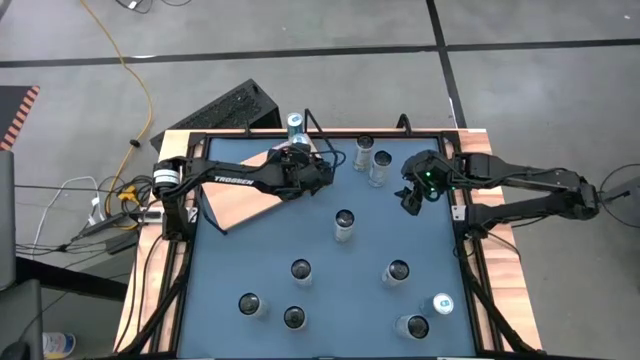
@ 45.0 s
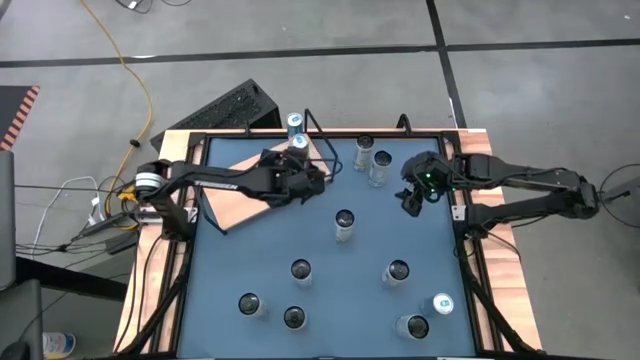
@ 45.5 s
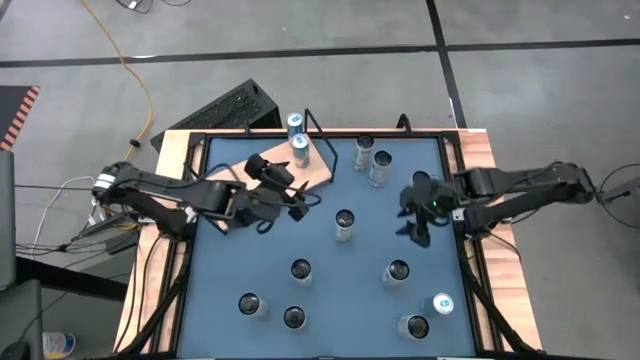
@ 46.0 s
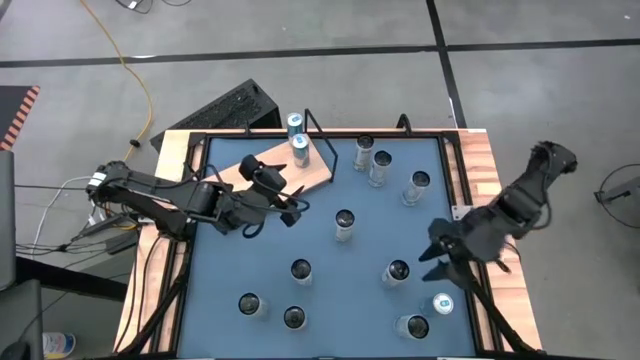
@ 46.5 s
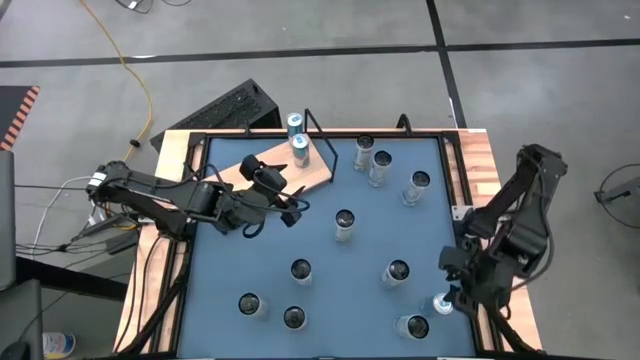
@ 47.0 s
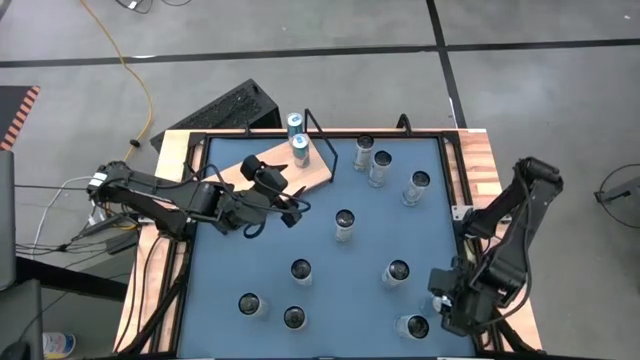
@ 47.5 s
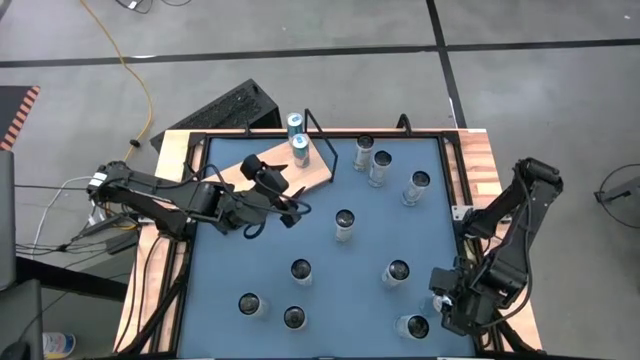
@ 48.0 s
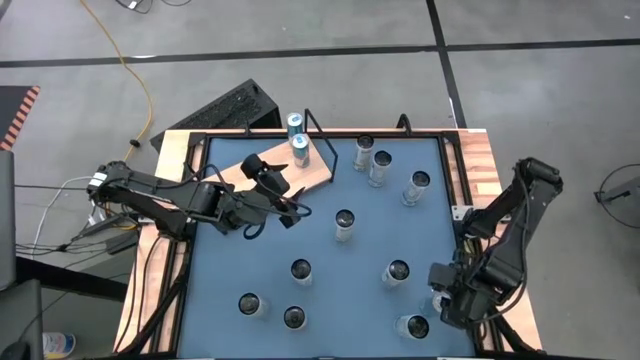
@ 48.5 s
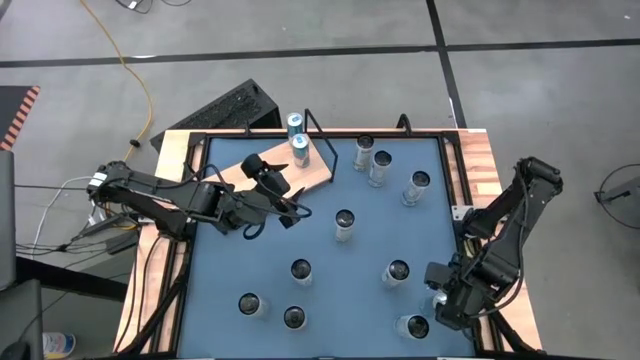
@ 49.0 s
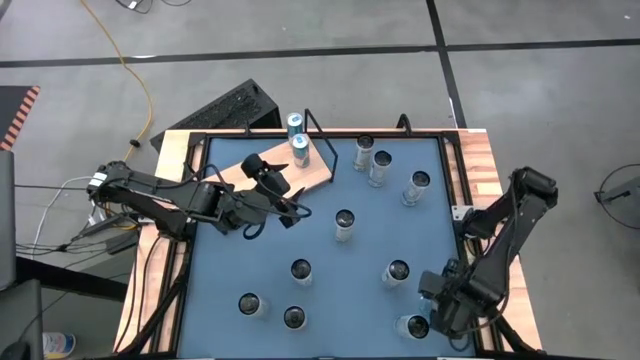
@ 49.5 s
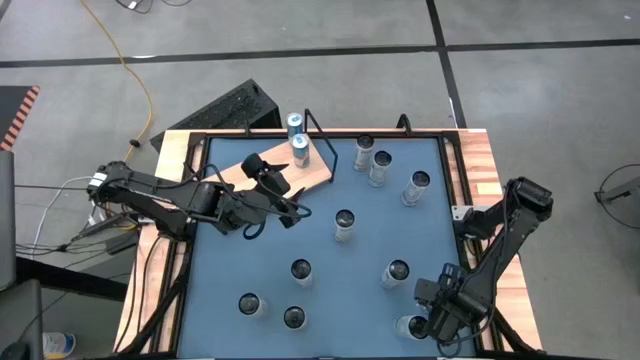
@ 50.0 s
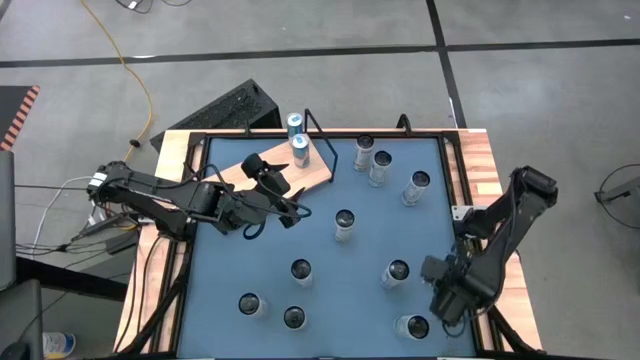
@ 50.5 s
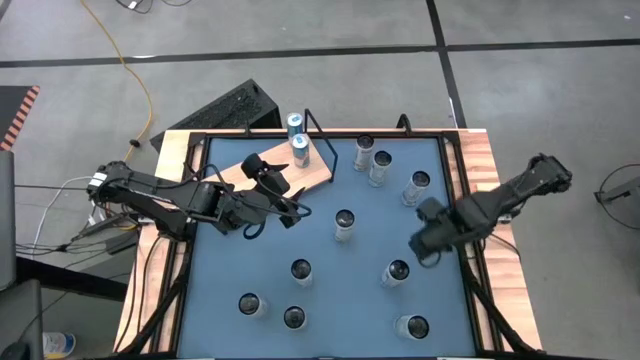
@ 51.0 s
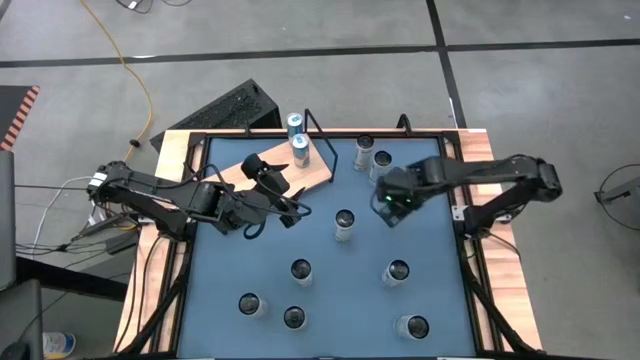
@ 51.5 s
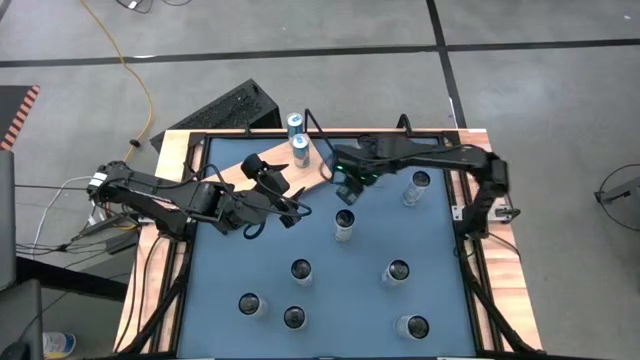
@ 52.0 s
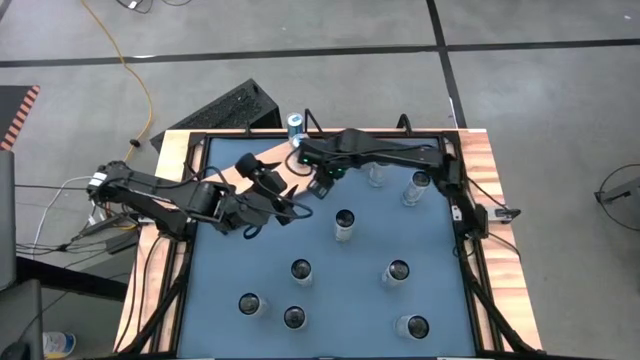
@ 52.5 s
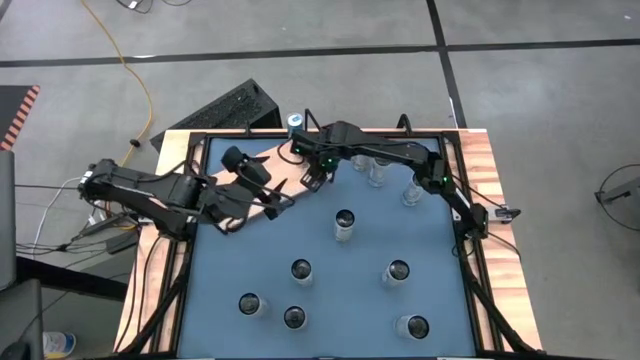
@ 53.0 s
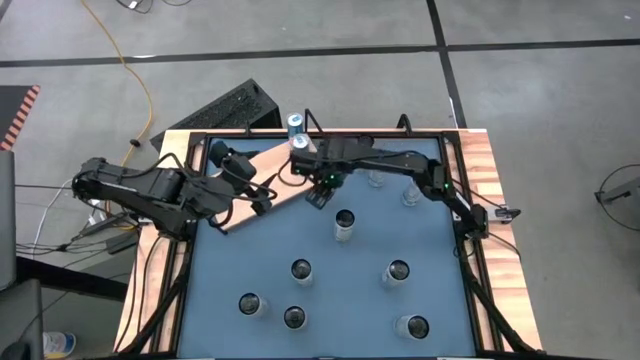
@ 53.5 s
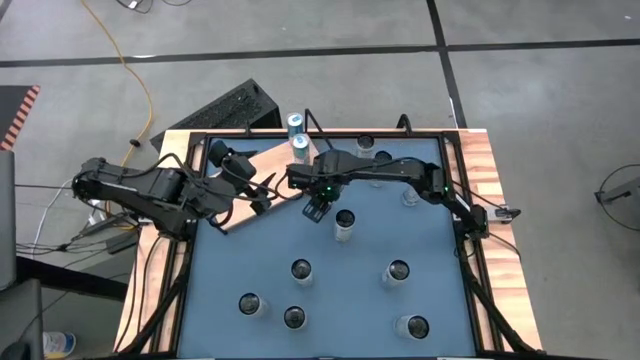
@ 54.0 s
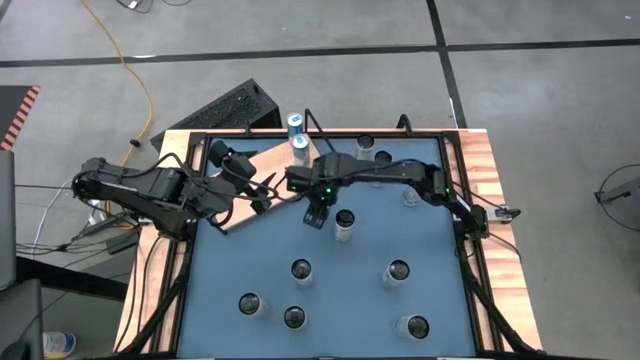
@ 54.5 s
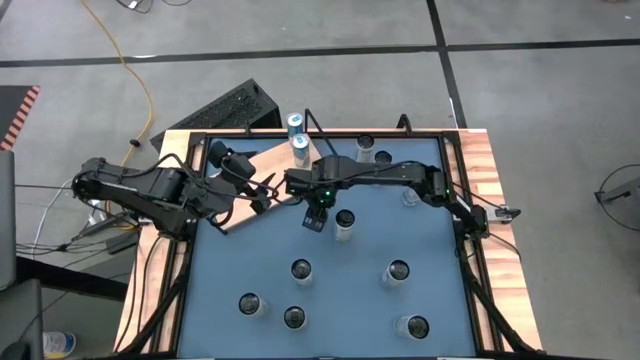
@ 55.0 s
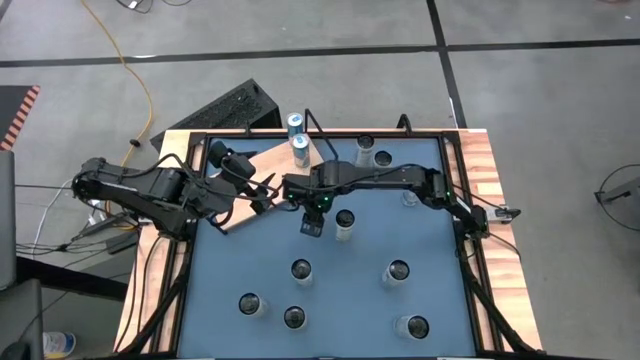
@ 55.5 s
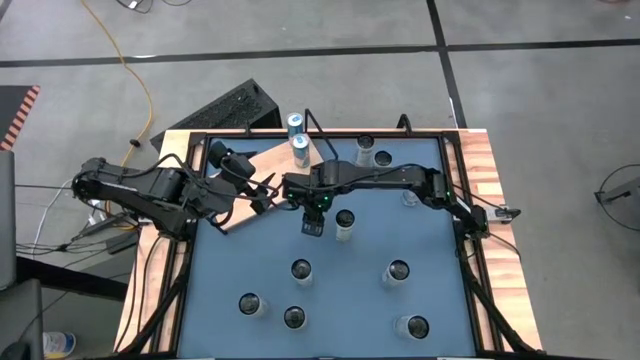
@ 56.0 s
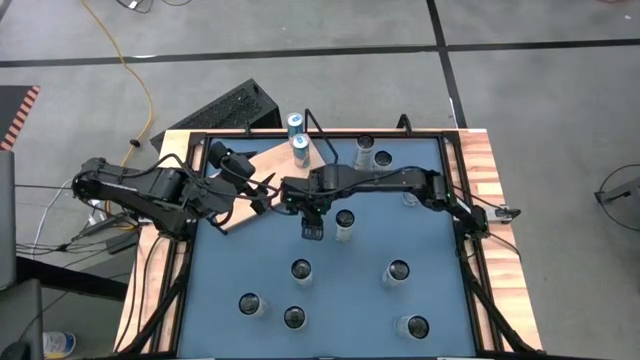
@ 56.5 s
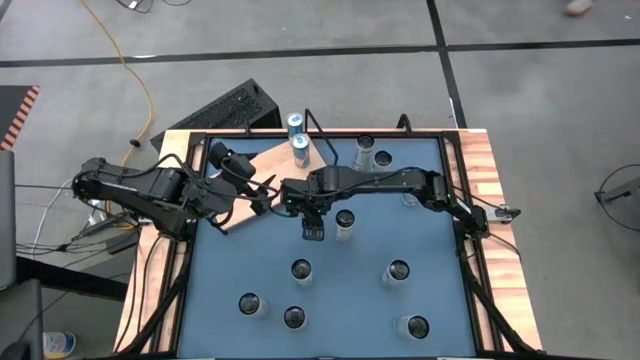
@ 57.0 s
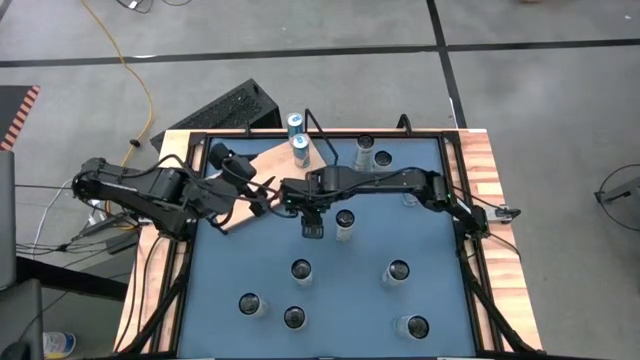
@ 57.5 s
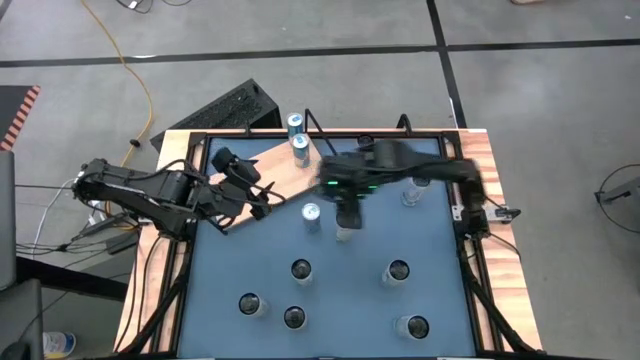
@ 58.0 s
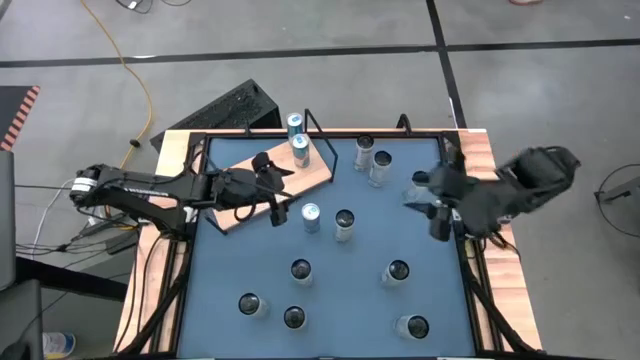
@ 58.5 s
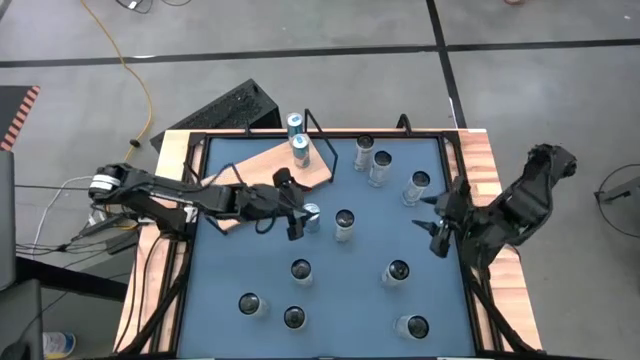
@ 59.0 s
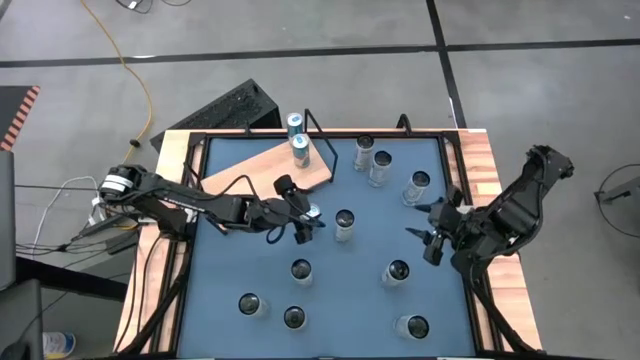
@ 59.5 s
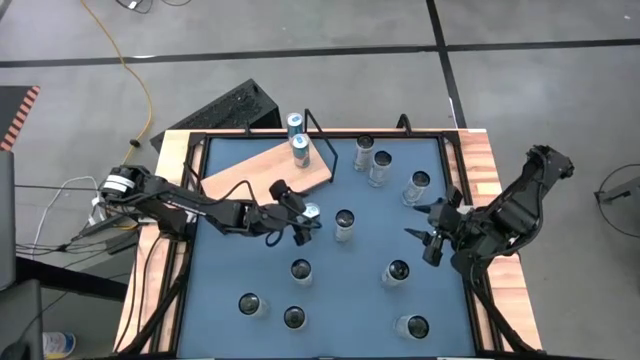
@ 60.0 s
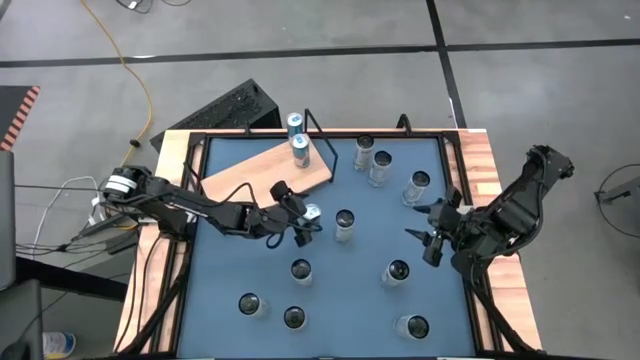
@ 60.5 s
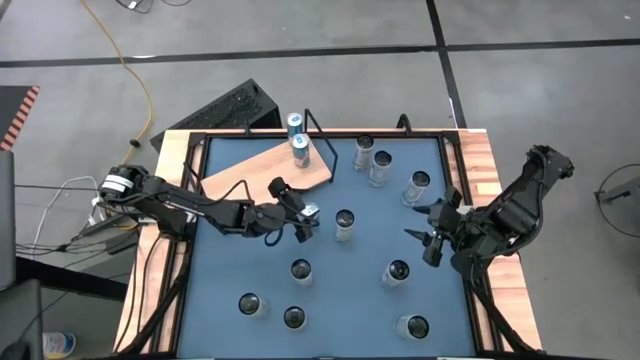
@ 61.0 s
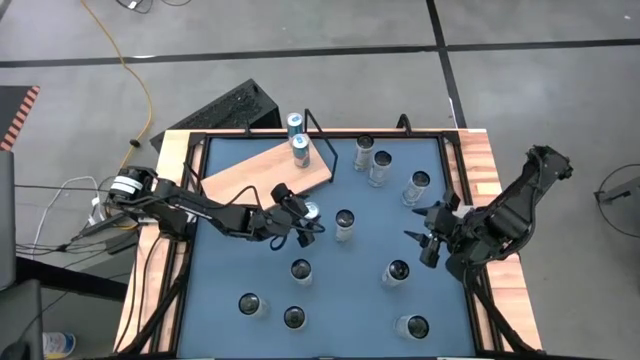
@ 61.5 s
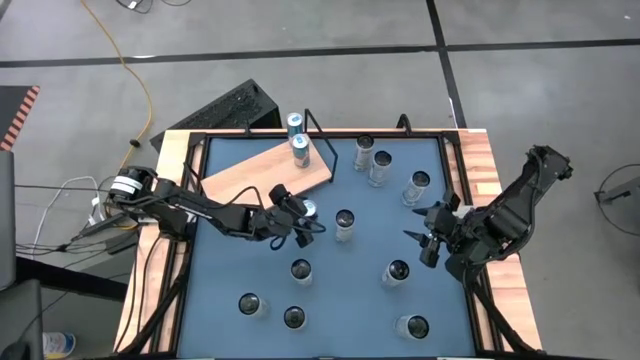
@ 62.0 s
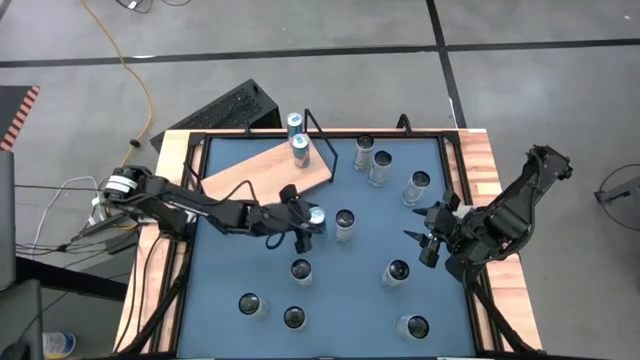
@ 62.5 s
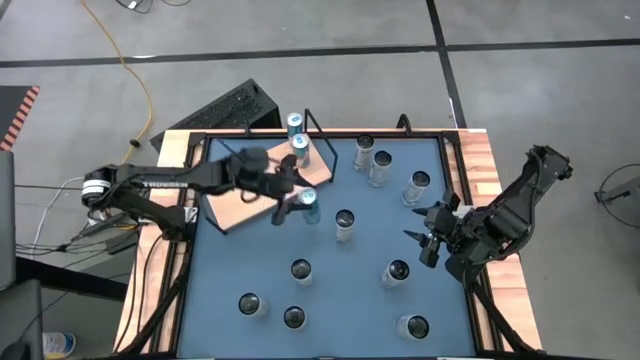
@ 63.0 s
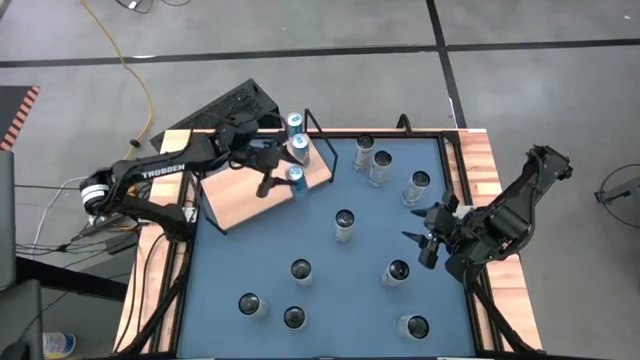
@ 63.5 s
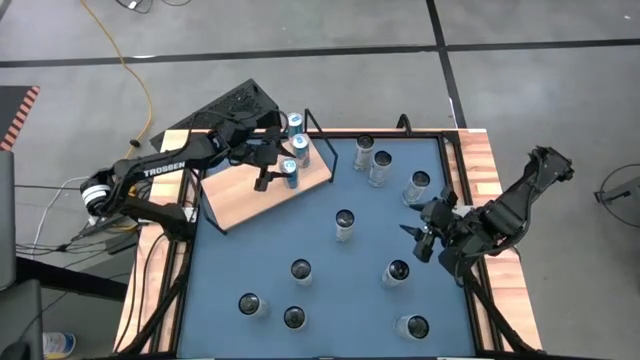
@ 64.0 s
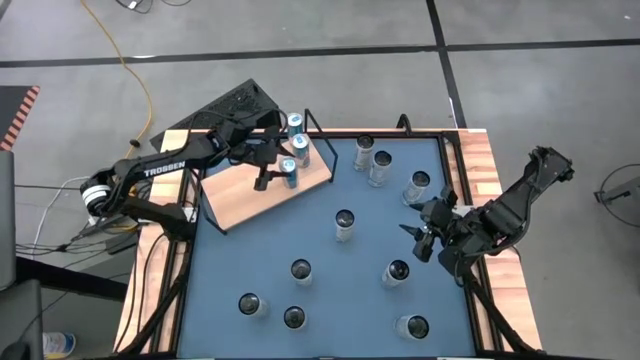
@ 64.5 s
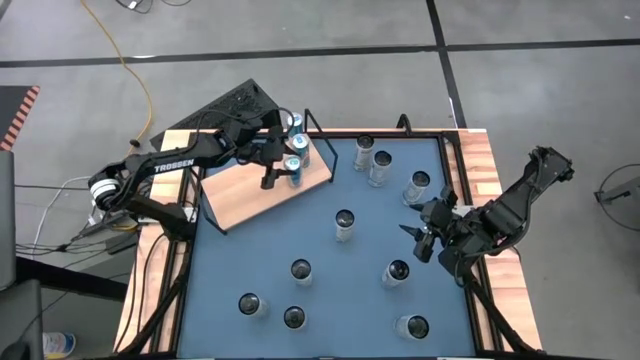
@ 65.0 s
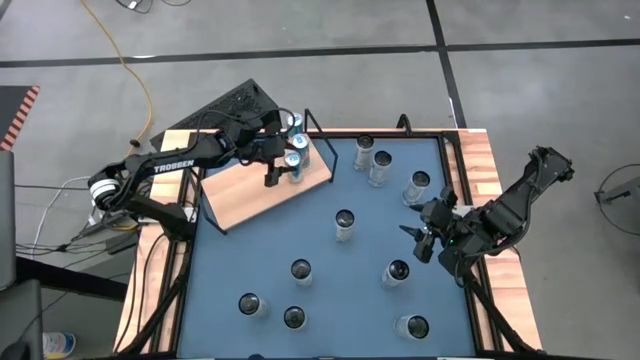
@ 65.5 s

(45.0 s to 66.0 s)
Task: Place canned beverage on shelf
Put the blue can aligned with the other blue soda can on the shelf
